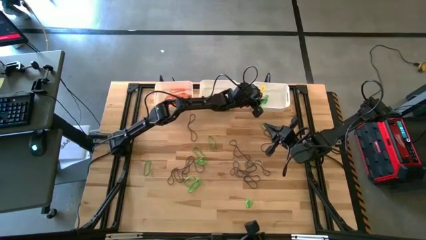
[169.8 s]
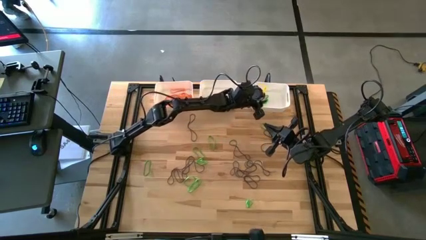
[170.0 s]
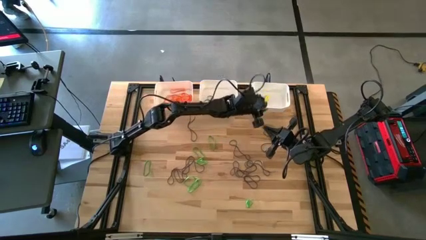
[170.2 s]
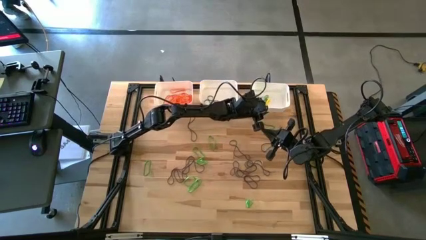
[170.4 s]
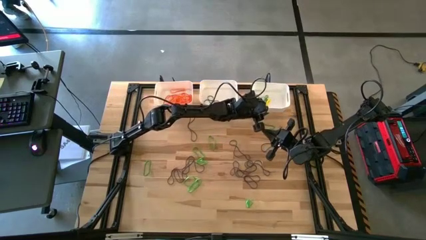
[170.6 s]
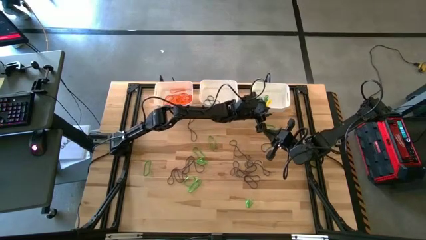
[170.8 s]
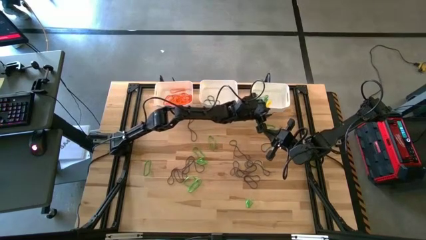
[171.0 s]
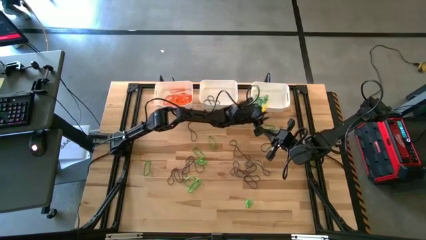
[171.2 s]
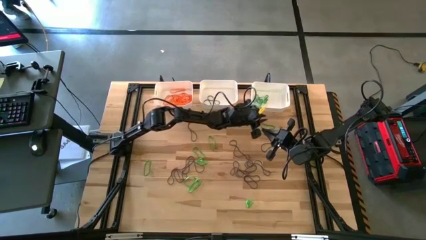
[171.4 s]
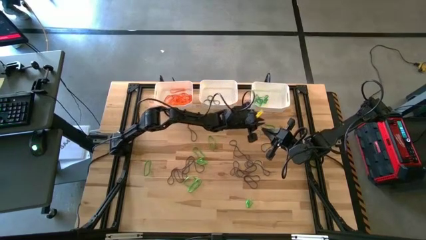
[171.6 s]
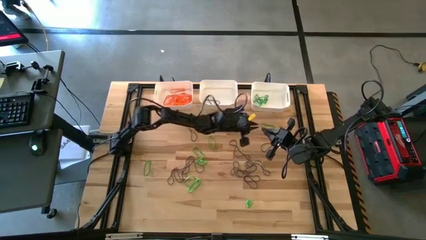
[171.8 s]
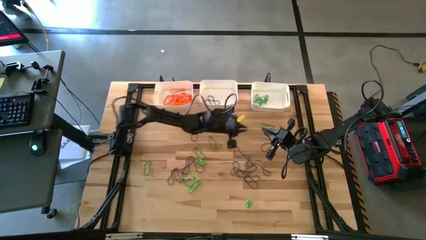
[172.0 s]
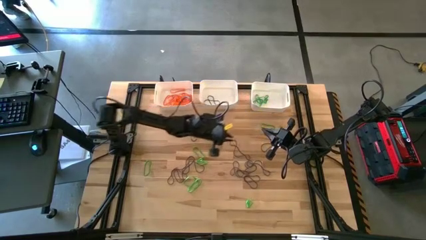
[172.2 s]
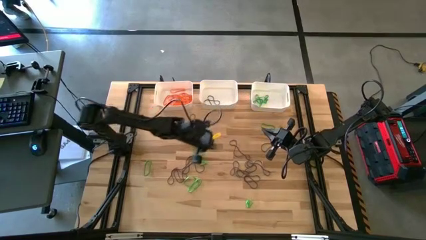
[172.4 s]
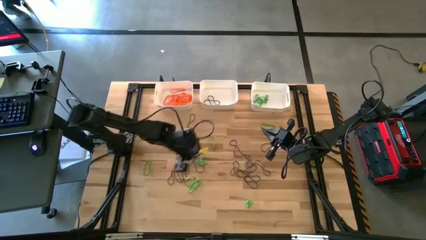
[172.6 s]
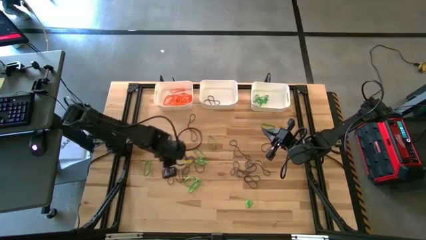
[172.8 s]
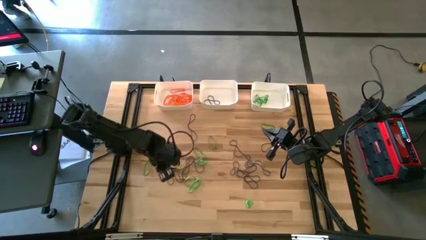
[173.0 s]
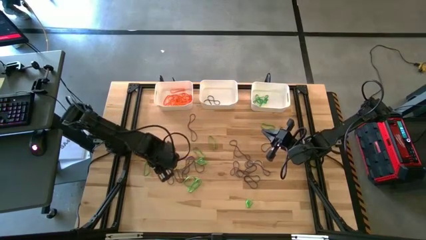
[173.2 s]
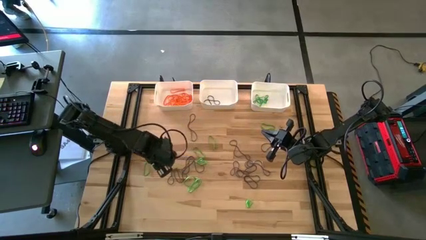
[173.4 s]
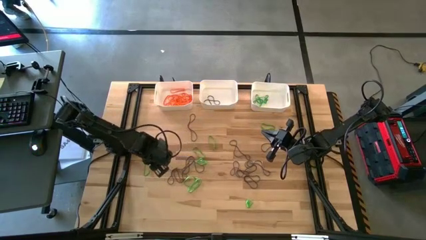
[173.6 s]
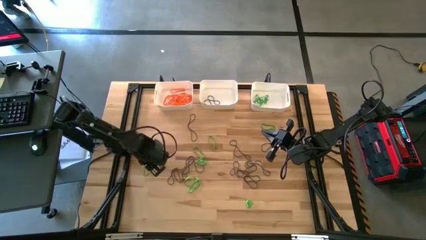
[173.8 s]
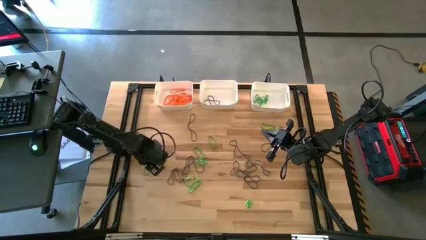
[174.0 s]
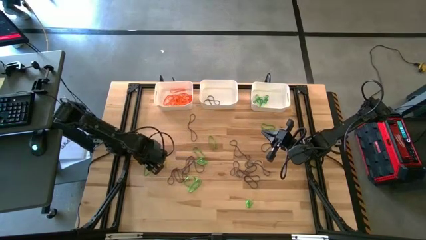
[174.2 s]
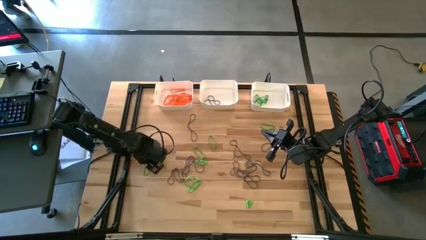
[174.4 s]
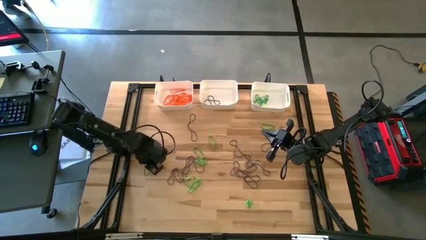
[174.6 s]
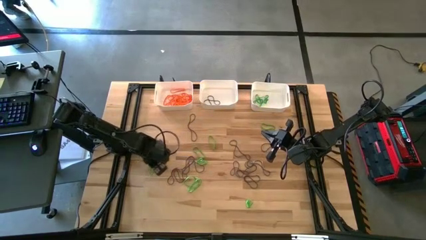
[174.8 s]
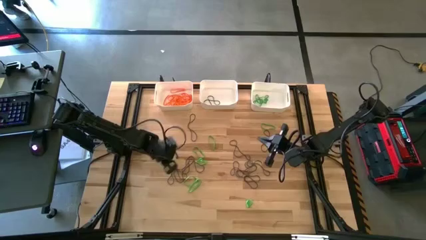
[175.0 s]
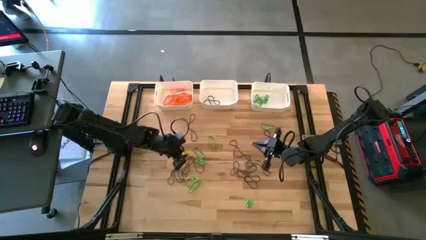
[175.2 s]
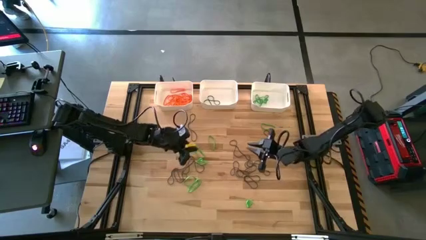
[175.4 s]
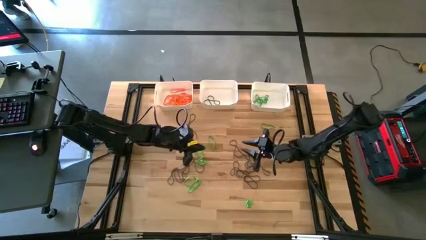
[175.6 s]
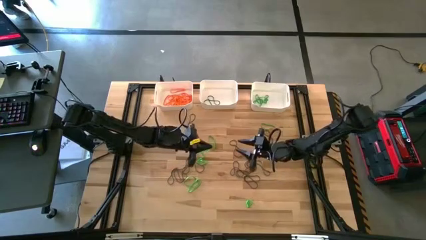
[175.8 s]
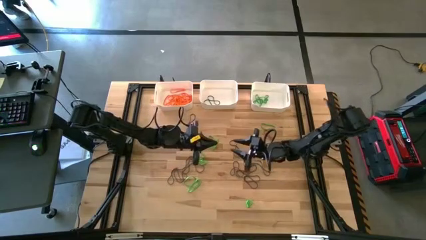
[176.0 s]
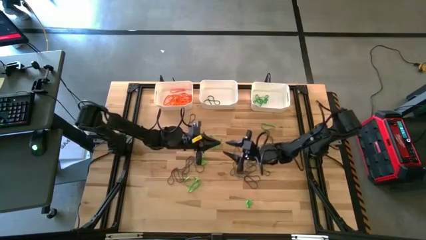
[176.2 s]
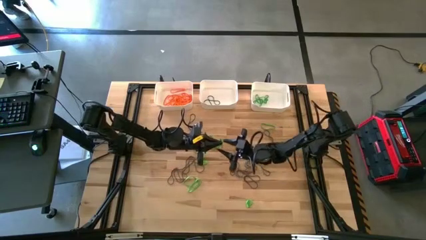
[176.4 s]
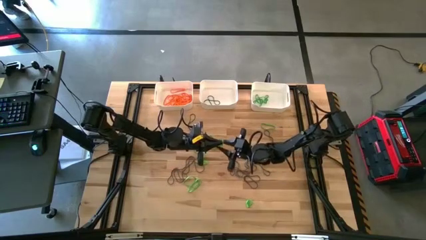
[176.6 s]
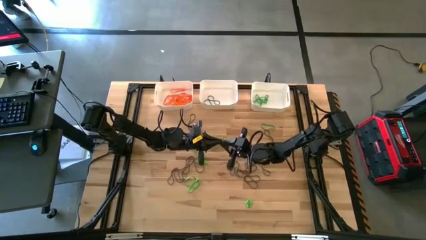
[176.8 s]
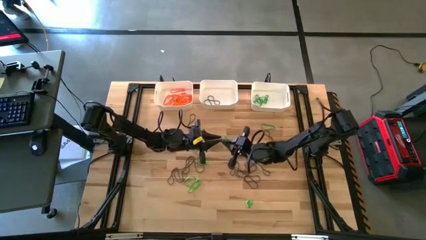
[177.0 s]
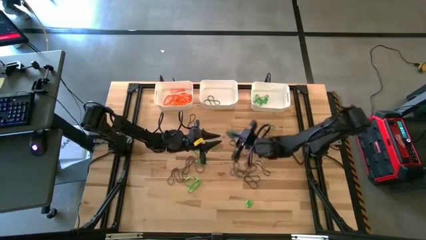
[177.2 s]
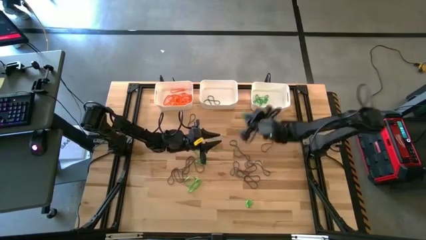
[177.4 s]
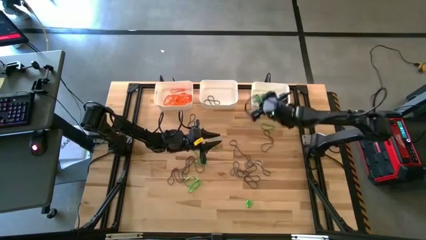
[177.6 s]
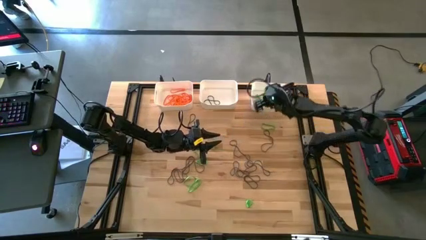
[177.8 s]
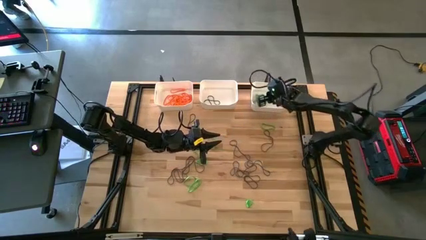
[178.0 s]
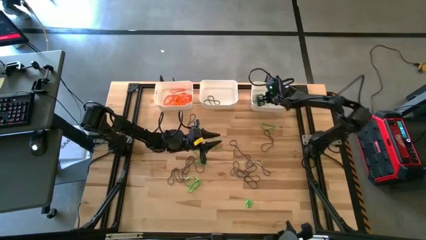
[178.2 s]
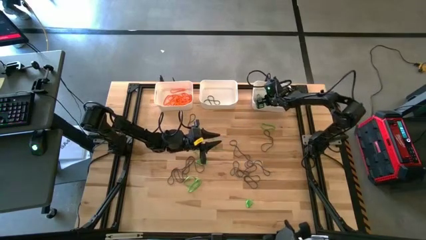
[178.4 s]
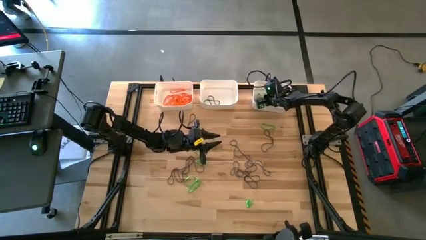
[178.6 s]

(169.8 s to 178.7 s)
Task: Sort rubber bands into baskets
Put the green rubber band into the right white bin

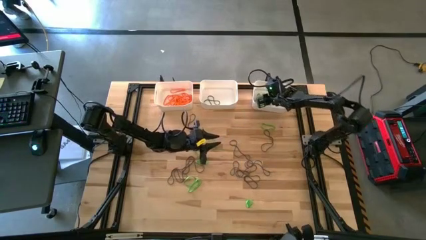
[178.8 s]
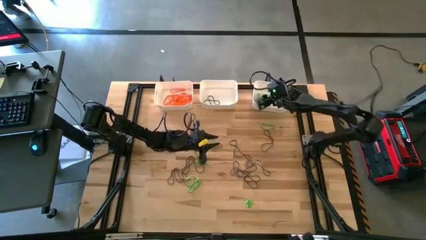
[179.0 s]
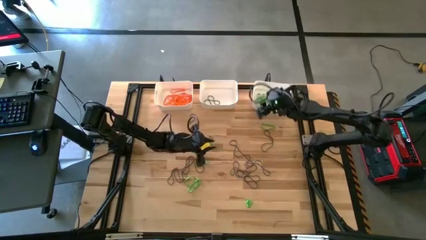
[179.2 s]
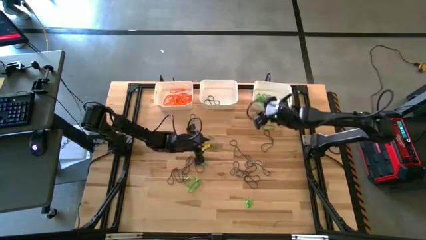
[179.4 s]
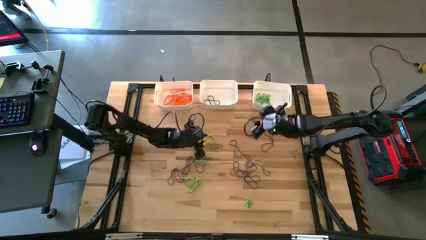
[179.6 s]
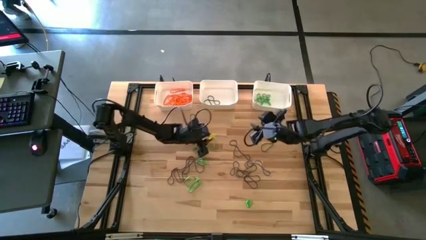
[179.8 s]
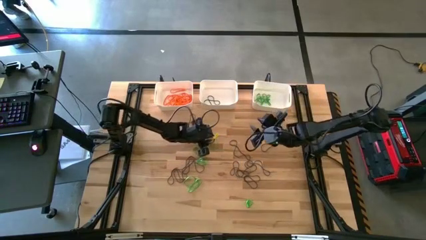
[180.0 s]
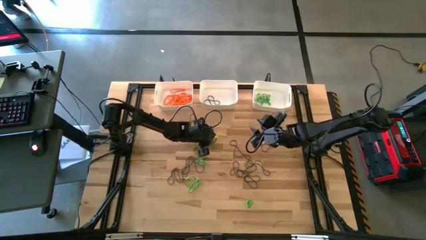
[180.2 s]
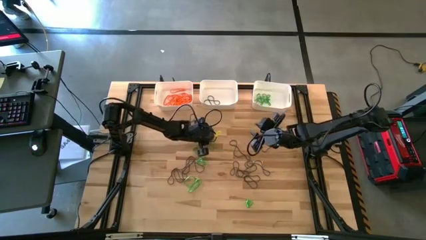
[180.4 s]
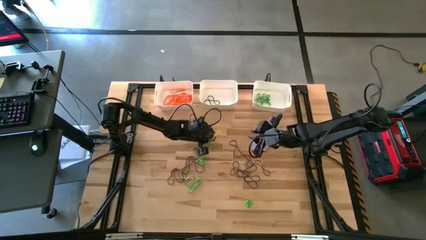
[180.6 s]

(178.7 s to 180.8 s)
Put the green rubber band into the right white bin

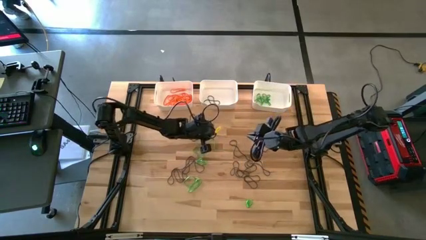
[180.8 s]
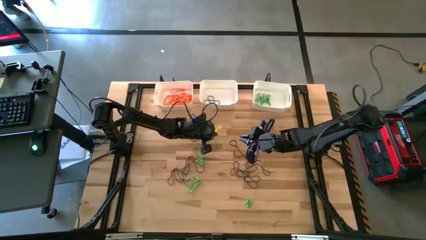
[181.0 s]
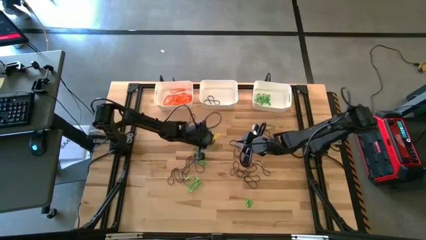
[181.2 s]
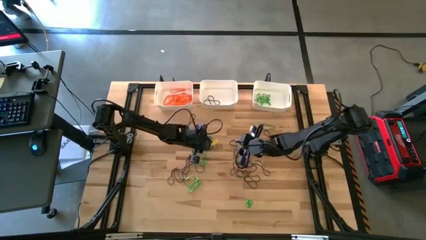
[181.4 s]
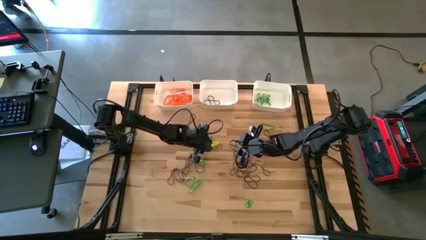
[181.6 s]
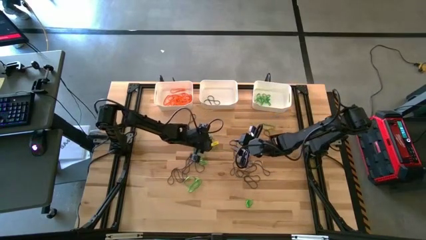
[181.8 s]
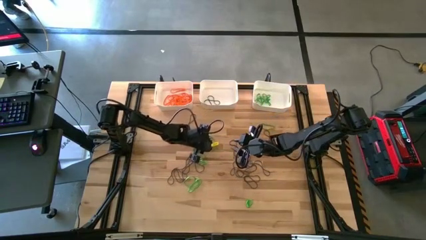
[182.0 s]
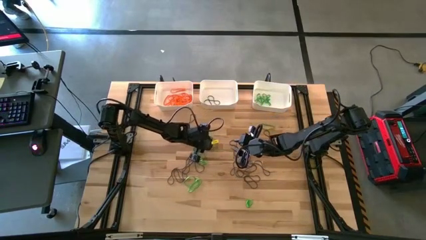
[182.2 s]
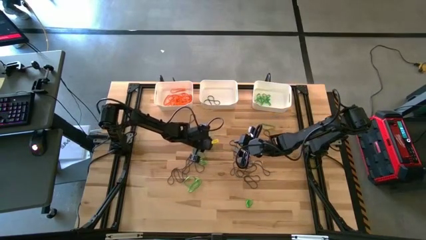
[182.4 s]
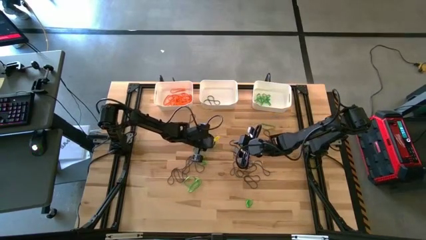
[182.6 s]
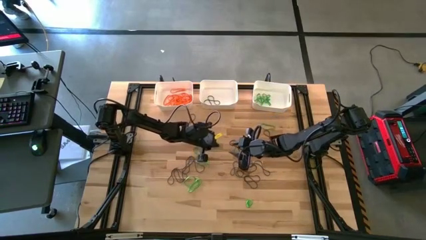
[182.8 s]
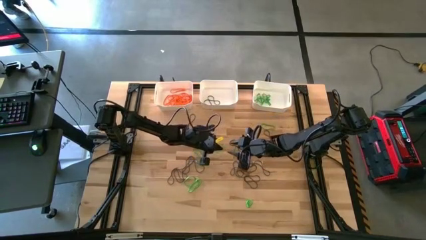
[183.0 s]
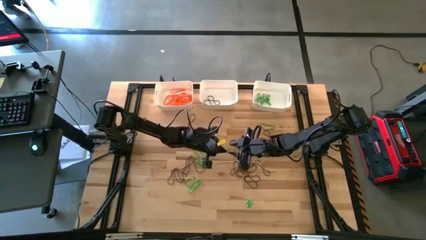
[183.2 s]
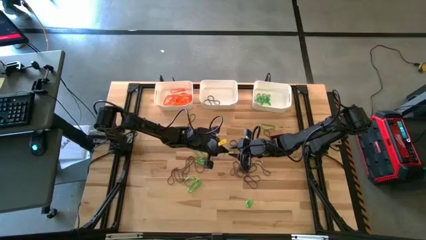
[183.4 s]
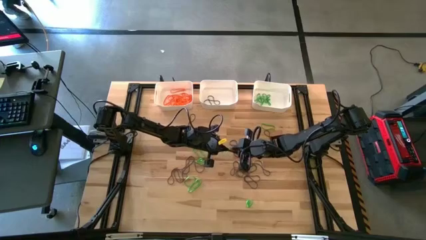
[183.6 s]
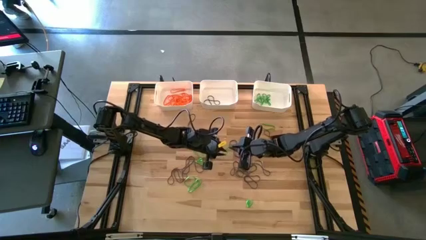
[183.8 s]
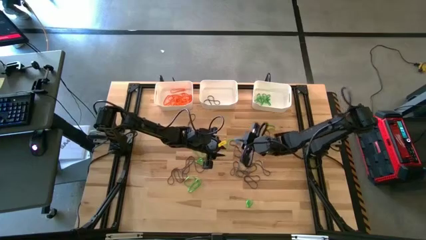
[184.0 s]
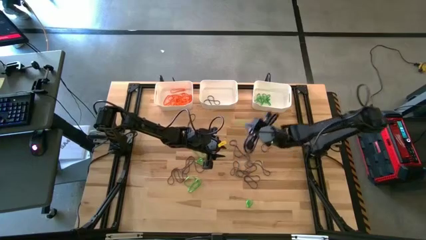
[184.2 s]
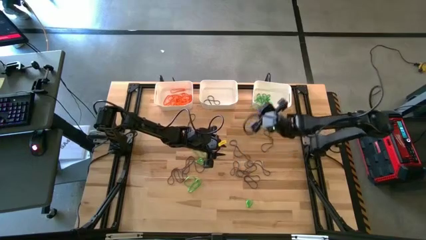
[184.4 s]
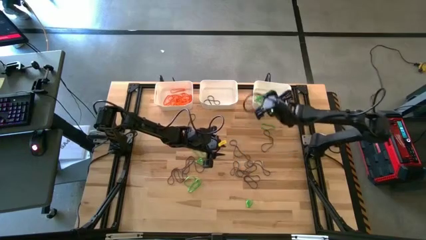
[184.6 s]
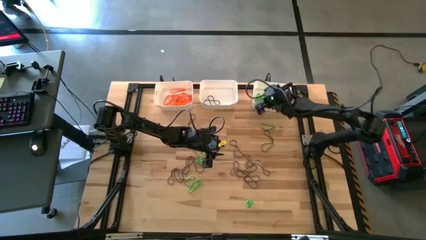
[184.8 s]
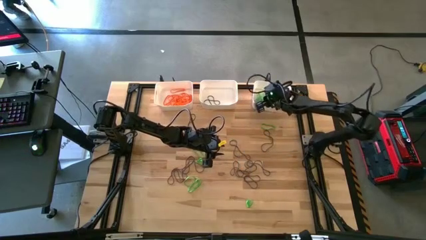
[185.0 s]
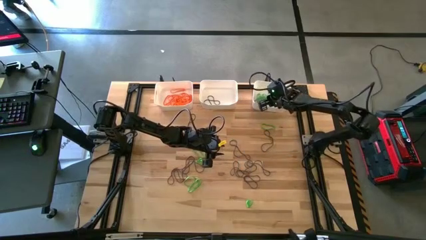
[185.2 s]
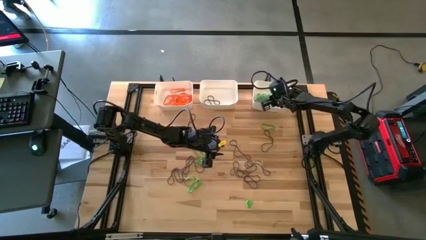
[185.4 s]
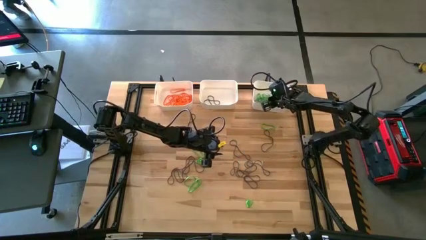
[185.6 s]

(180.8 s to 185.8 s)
Put the green rubber band into the right white bin
